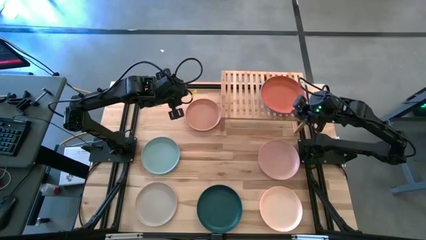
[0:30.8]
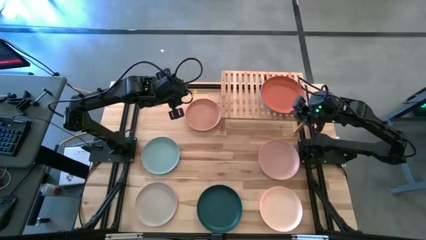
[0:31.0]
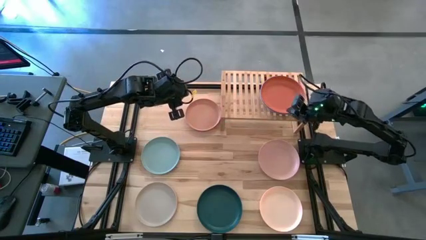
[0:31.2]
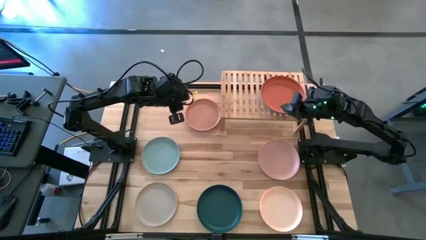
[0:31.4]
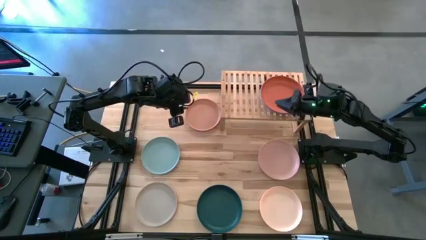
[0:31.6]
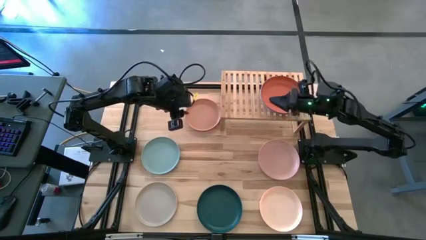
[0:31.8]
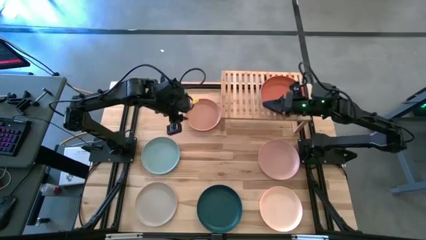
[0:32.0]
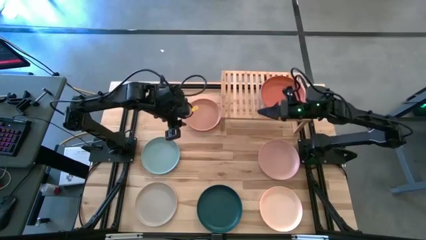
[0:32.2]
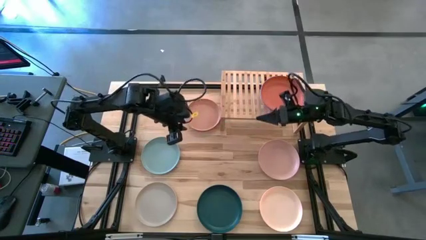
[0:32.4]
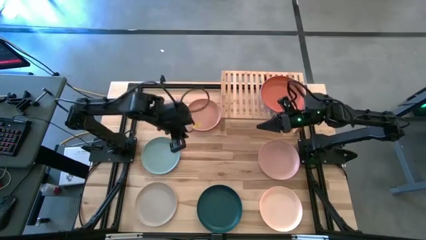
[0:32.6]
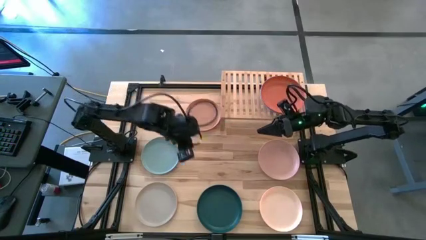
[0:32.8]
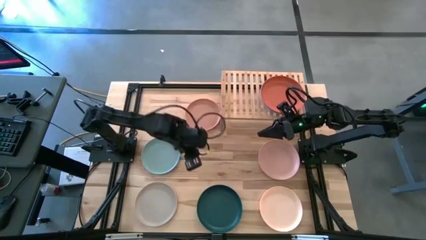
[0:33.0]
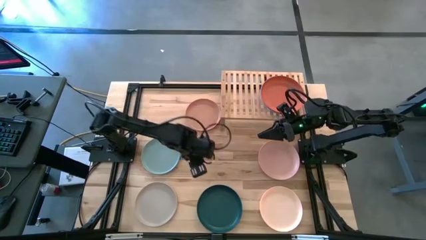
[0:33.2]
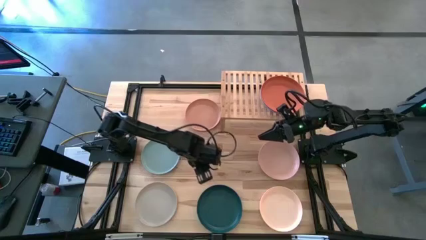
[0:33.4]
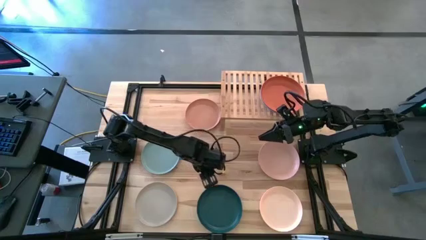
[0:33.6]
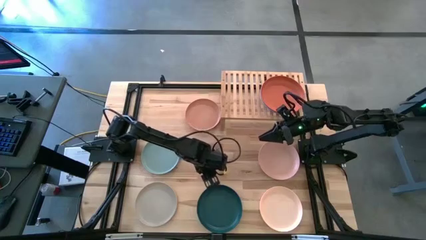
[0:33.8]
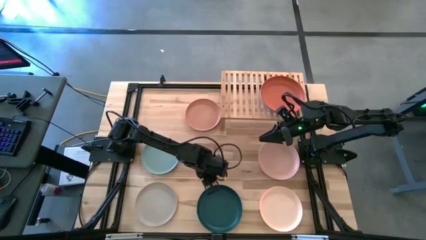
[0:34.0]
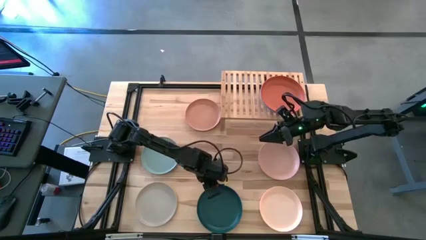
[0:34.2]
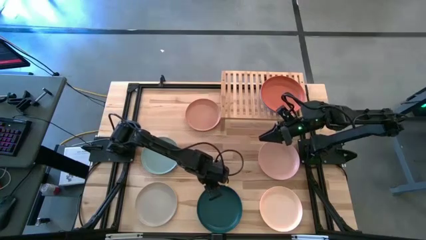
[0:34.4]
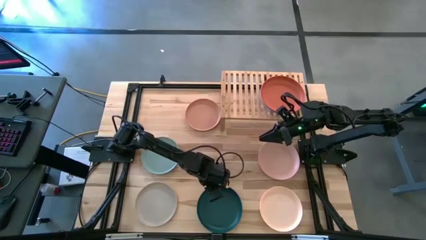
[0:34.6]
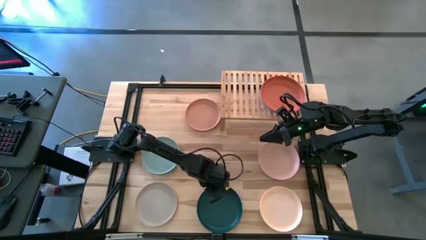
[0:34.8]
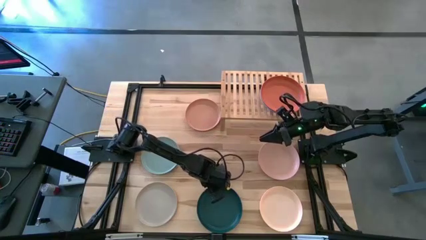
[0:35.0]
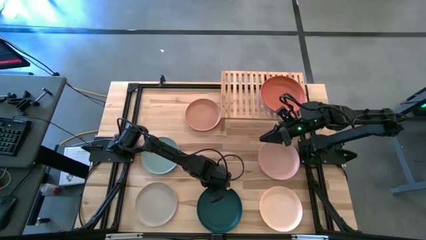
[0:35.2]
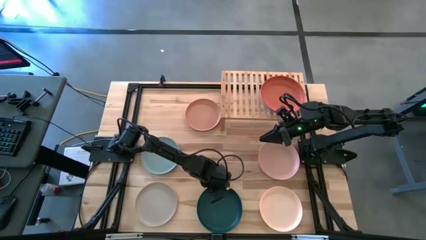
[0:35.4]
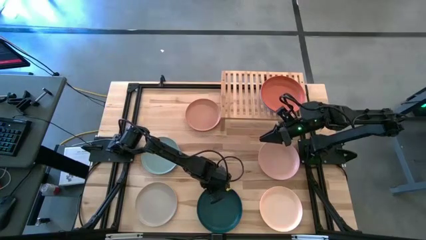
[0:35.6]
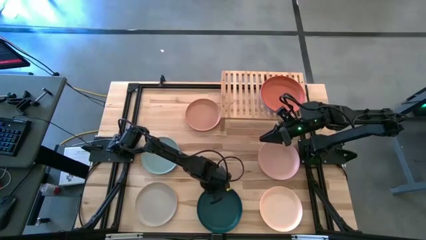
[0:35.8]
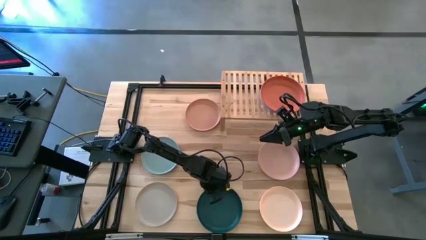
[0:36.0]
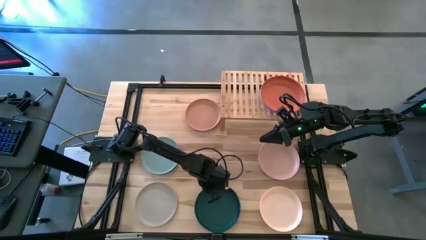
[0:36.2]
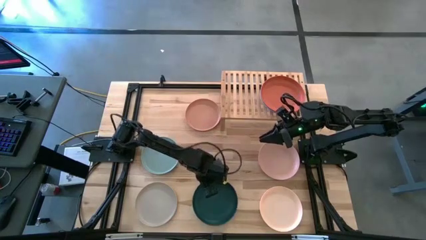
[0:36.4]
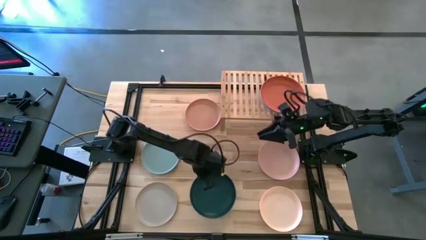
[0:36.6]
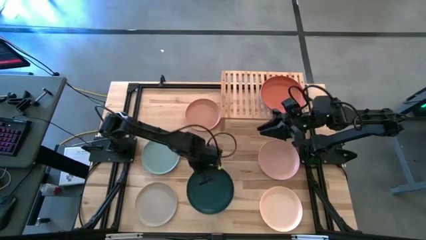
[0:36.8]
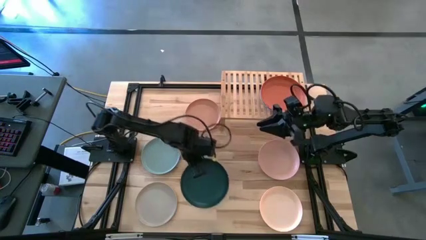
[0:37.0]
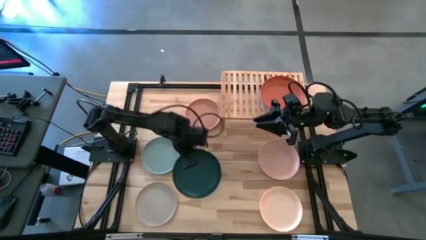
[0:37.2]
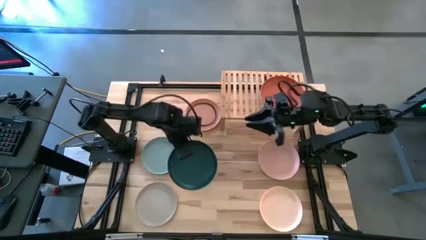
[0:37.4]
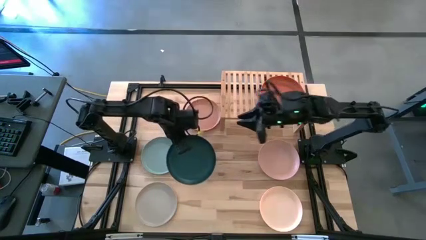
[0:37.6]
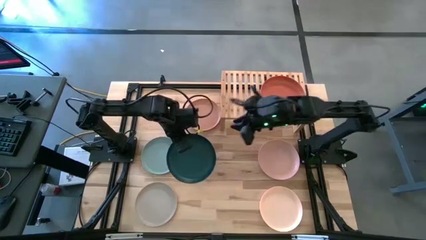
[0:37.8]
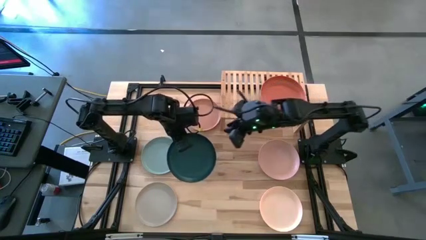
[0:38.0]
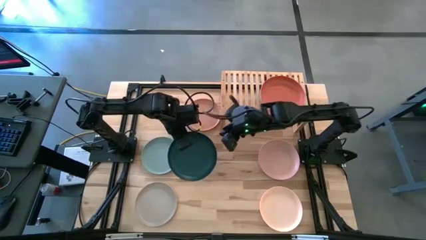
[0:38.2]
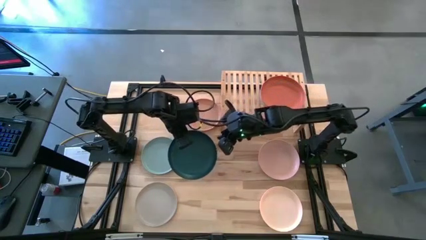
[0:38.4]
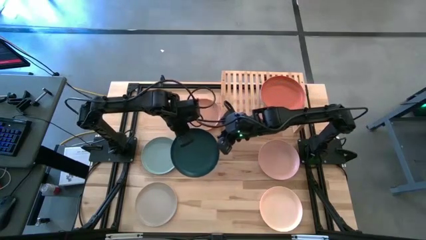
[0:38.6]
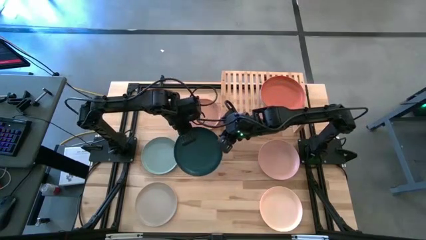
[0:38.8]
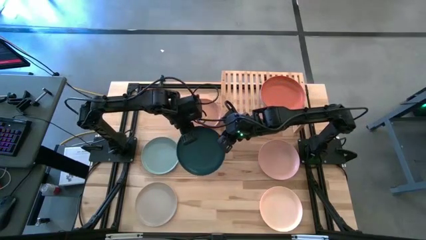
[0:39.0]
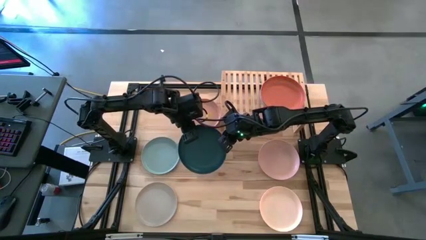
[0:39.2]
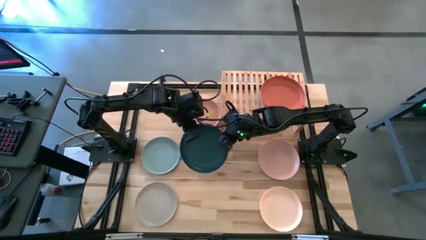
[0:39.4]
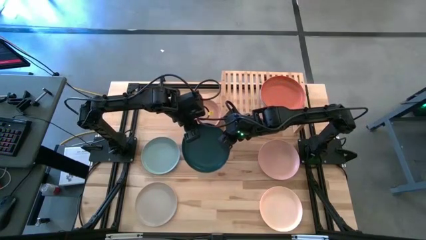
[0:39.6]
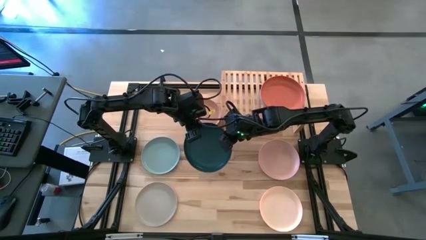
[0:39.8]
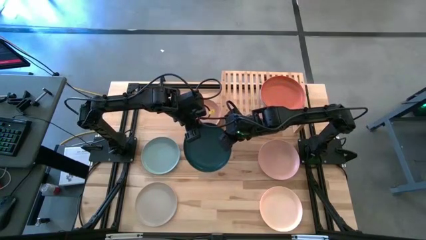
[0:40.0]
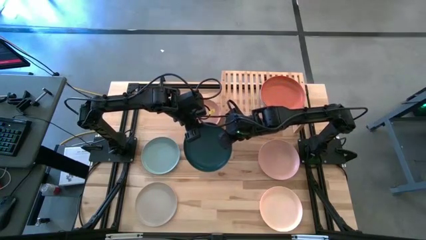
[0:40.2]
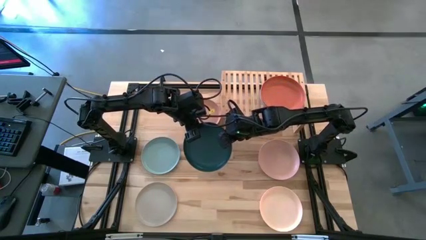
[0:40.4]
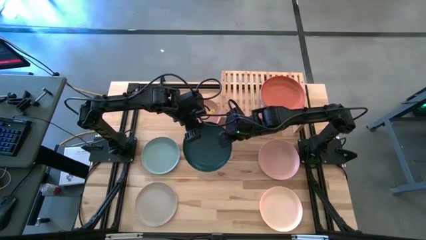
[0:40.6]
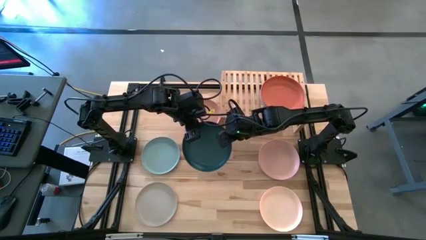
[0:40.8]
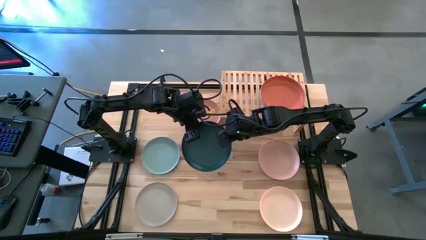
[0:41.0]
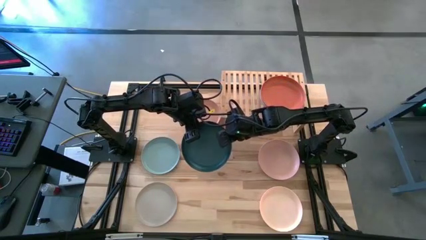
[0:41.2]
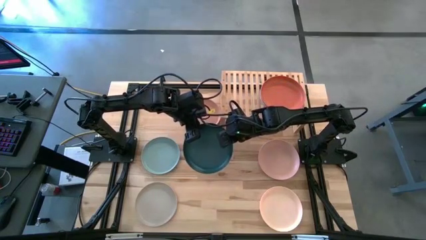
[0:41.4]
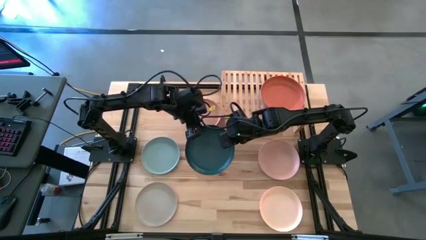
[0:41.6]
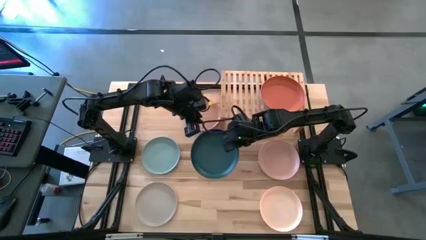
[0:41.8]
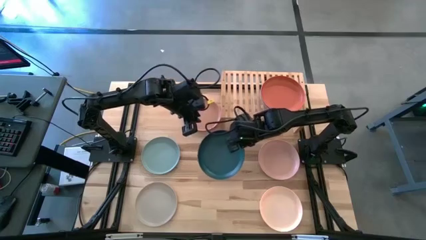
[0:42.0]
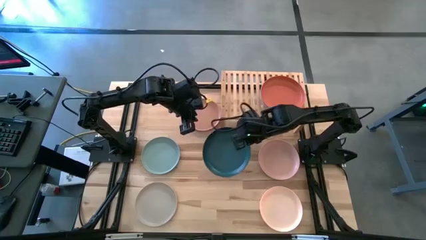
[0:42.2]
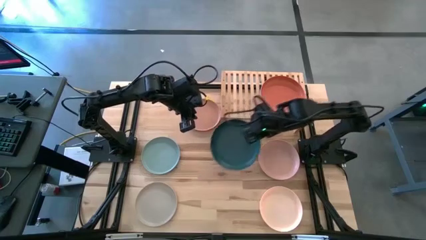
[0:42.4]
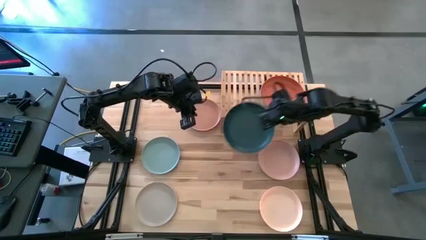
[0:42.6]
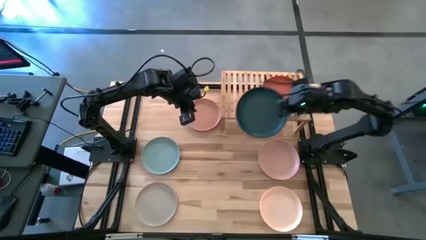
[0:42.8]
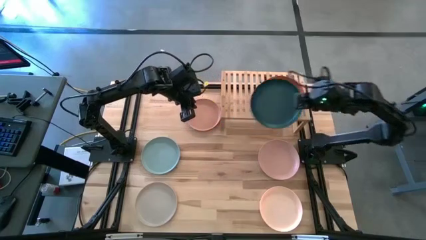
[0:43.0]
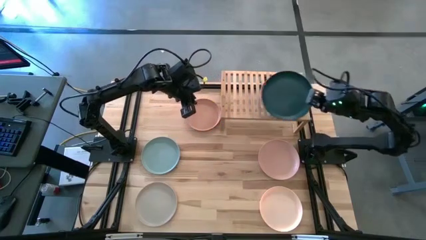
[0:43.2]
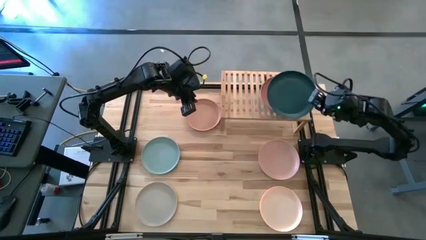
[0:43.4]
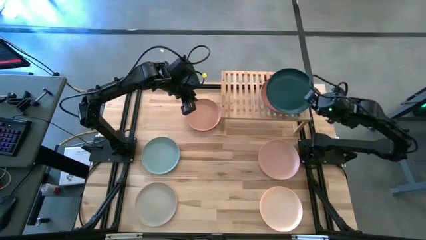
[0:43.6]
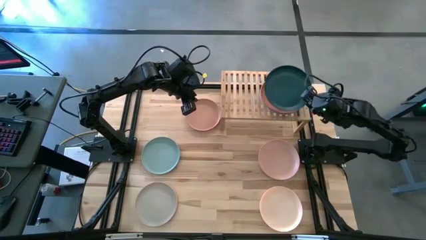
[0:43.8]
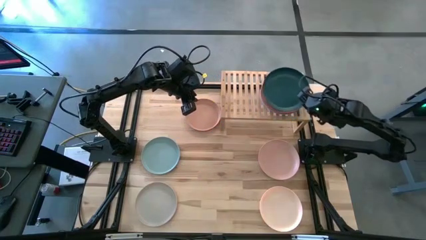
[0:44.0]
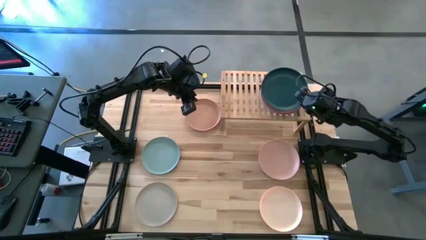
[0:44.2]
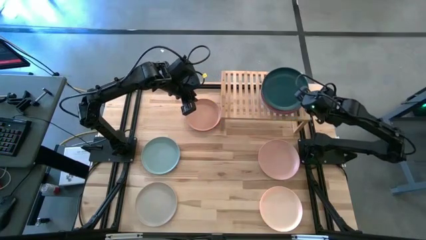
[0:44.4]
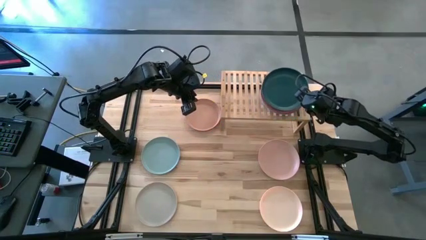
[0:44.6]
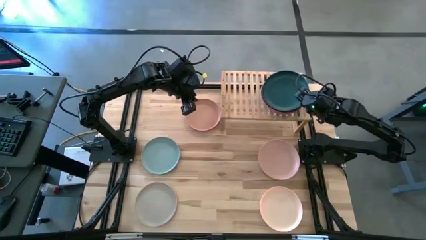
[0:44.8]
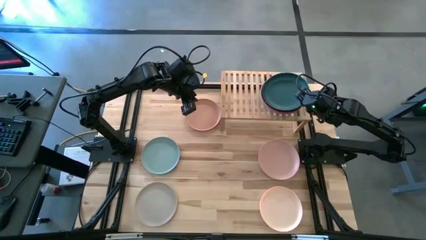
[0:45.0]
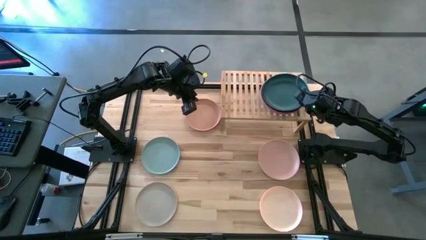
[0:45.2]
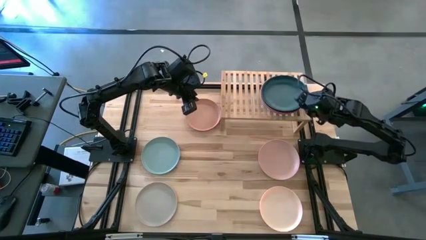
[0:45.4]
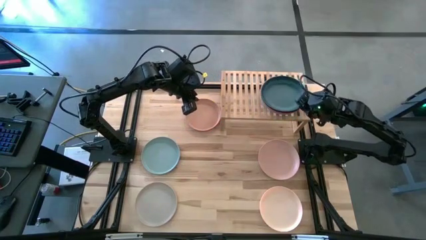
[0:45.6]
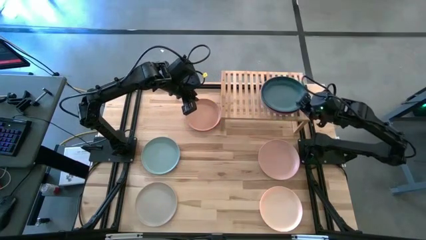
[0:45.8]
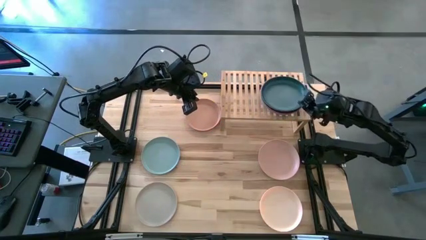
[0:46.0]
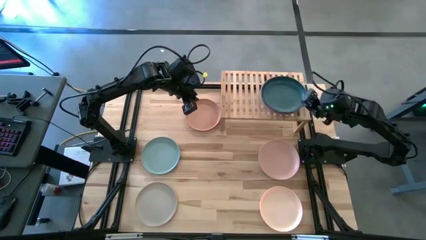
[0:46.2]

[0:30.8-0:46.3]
Task: Place and stack plates onto a shelf
Stack the dark green plate on the orange plate on the shelf
